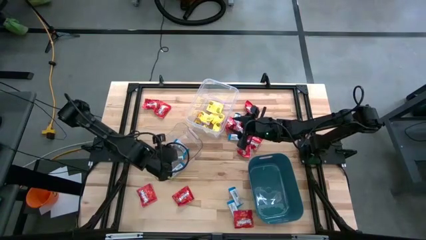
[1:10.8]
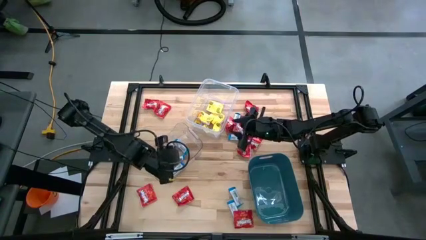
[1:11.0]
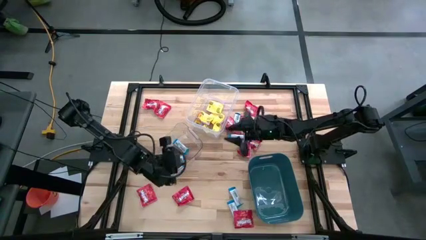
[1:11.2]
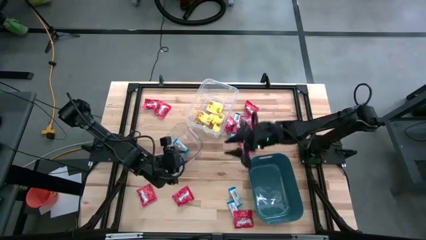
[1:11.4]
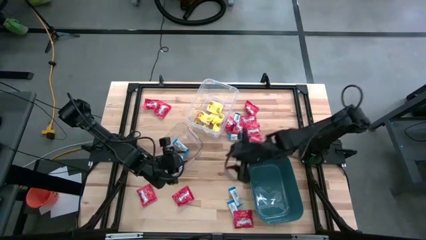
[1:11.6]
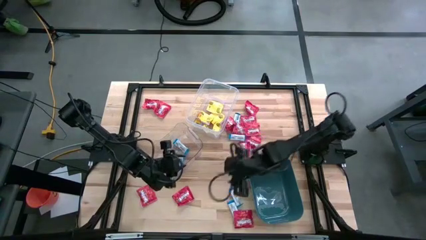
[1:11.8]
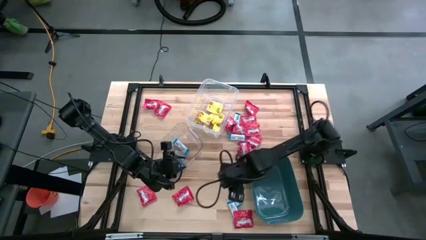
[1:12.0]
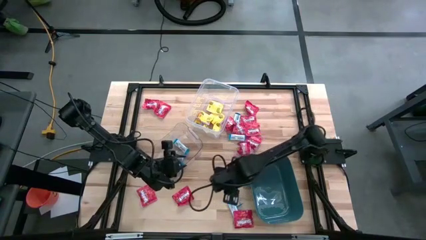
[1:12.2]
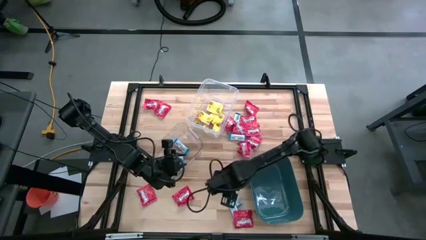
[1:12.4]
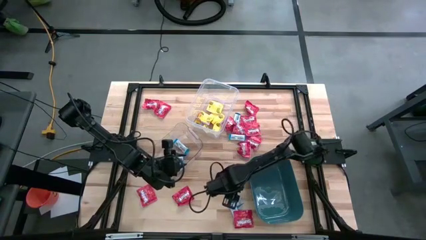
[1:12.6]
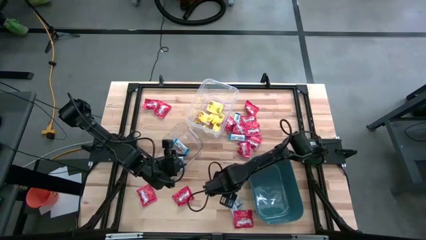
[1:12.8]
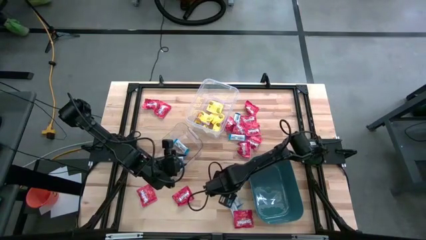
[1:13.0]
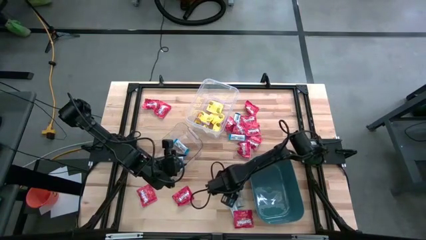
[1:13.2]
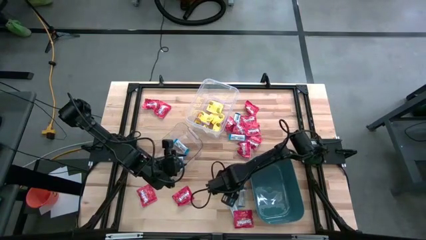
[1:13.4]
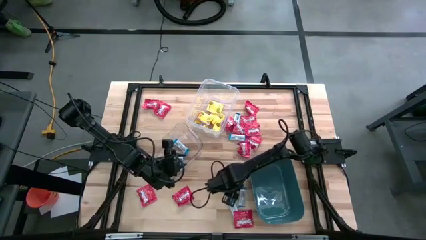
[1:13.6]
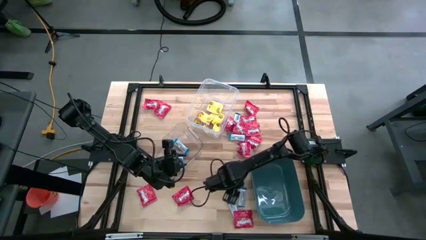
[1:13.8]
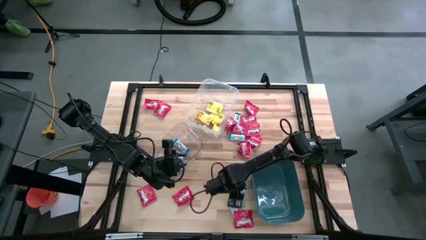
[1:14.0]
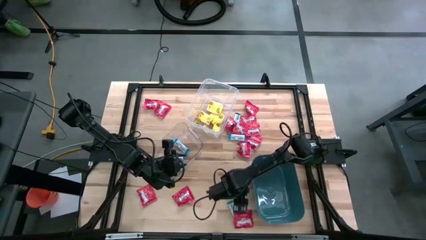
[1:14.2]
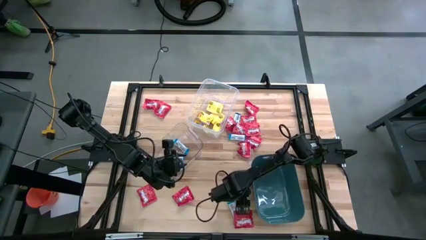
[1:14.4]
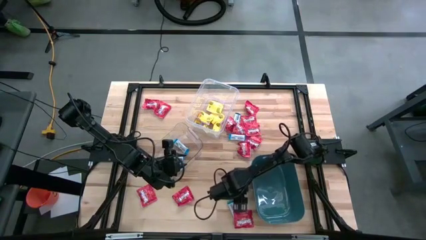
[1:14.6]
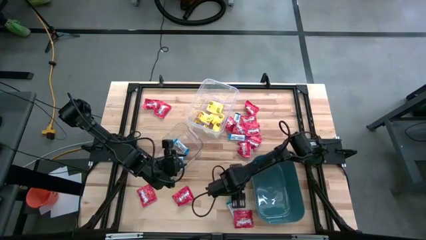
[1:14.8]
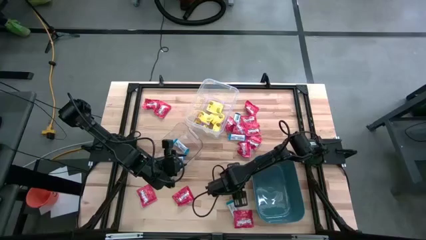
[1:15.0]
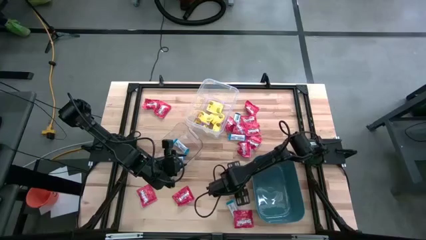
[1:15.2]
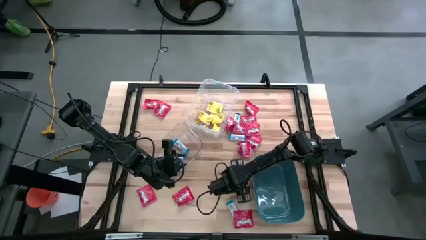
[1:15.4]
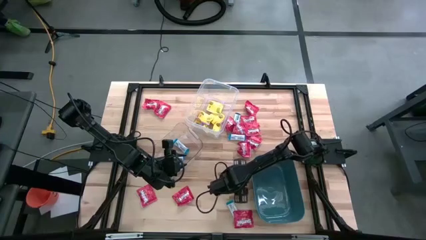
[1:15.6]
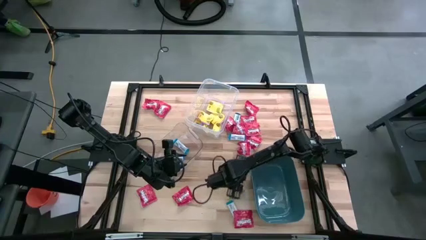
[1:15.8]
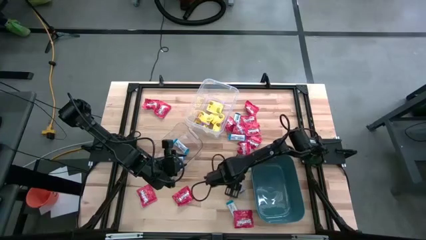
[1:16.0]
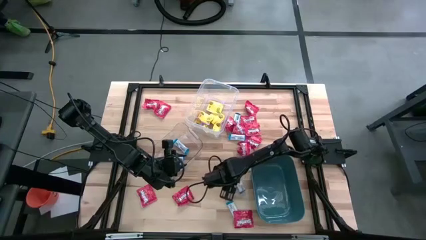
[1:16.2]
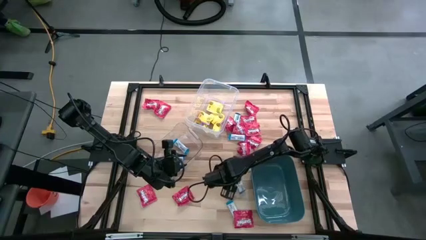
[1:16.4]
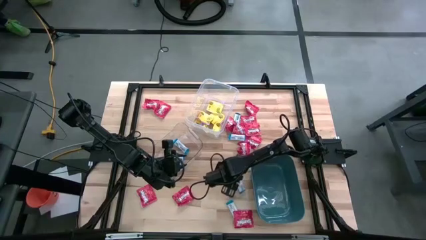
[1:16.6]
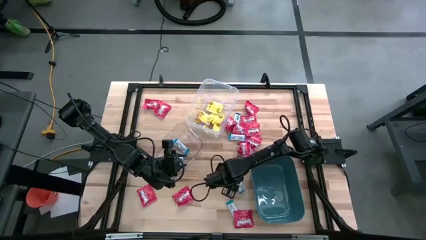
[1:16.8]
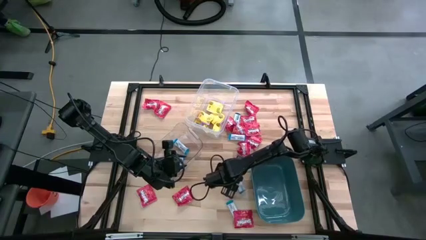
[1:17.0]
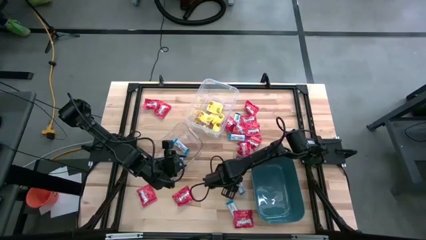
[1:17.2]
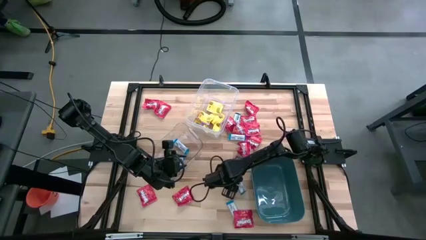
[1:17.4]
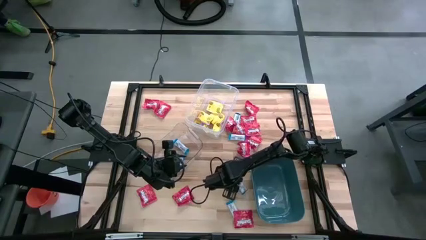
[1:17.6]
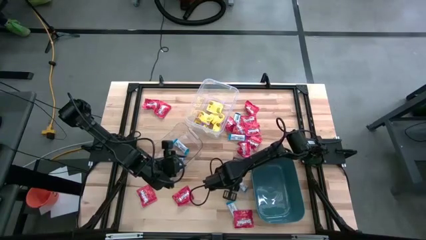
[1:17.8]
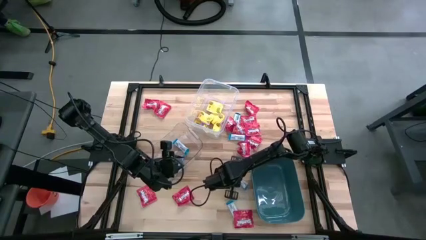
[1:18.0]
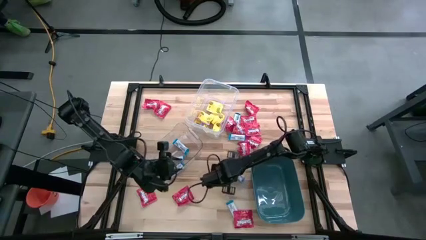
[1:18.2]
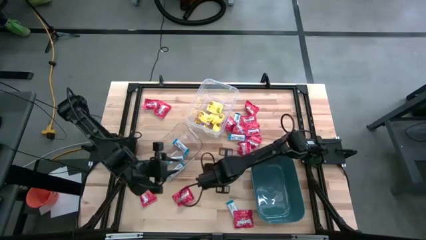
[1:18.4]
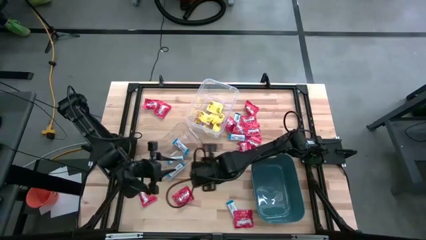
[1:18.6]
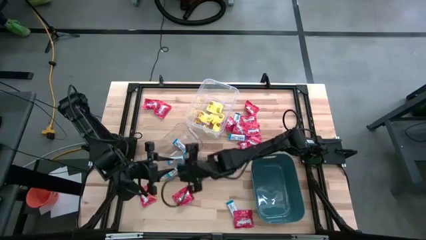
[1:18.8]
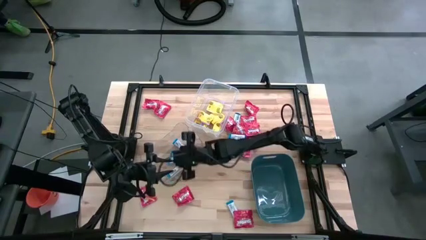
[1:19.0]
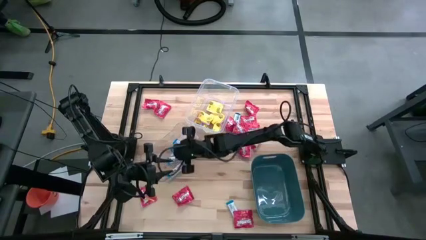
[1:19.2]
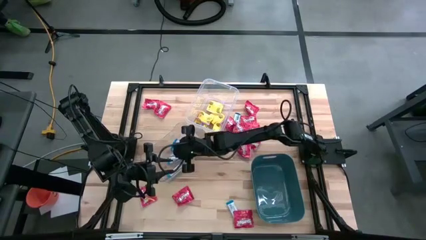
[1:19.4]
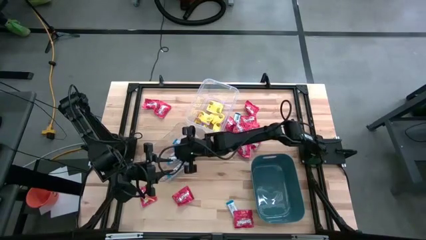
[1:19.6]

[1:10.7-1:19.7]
Task: Sort candy
Put the white chocolate into the transparent bin

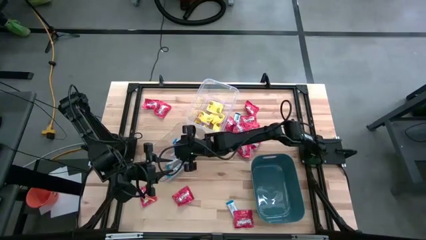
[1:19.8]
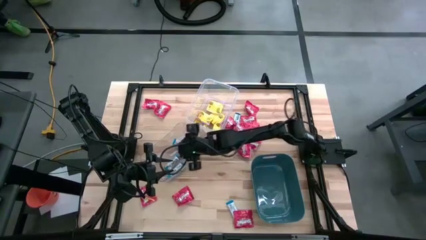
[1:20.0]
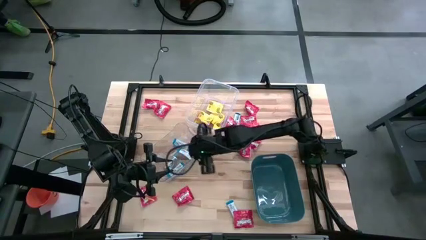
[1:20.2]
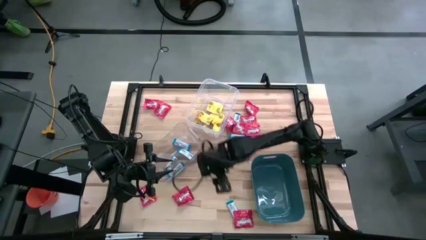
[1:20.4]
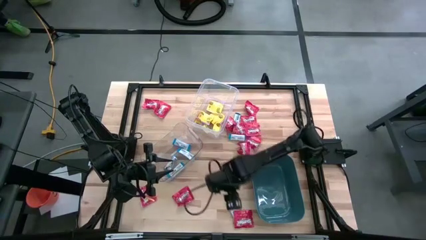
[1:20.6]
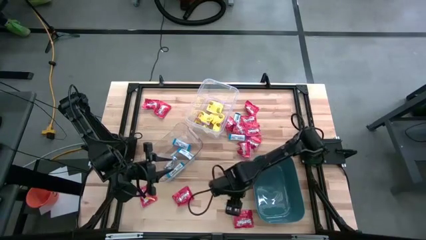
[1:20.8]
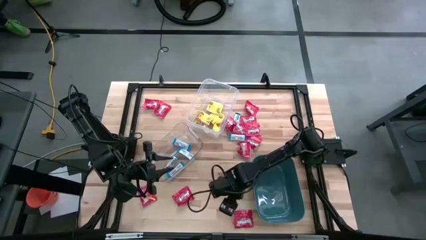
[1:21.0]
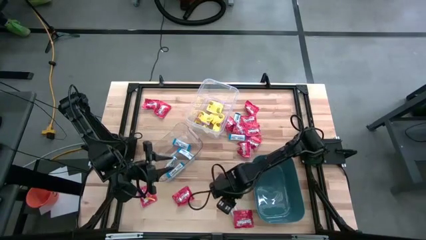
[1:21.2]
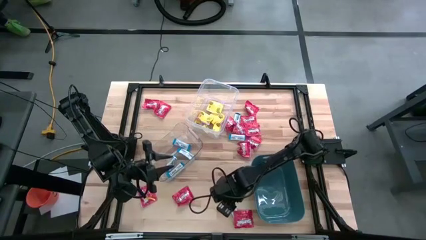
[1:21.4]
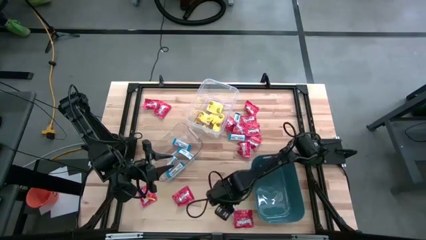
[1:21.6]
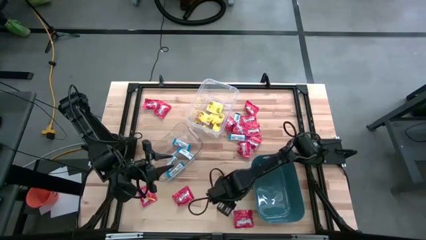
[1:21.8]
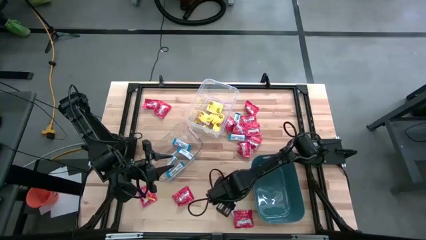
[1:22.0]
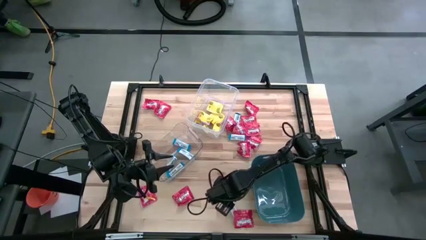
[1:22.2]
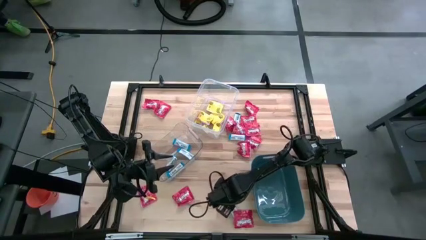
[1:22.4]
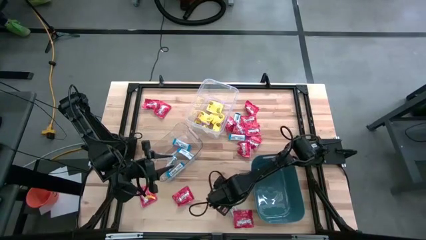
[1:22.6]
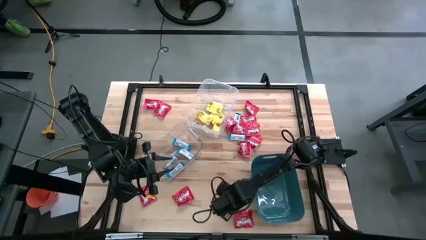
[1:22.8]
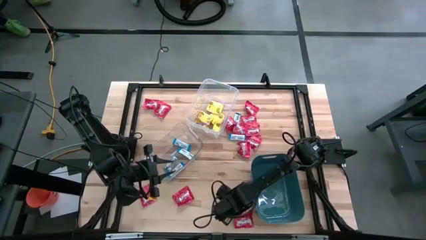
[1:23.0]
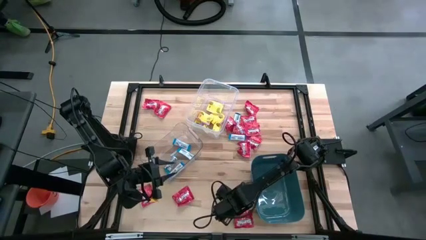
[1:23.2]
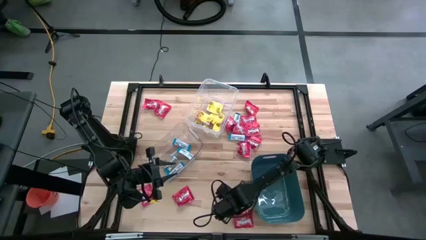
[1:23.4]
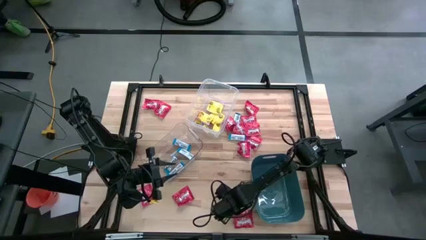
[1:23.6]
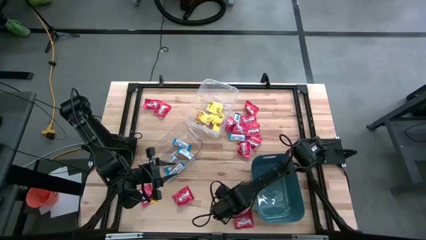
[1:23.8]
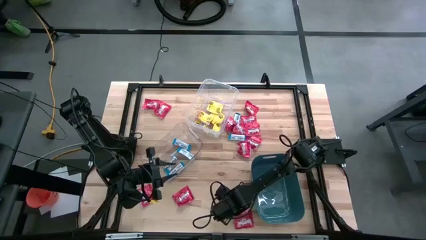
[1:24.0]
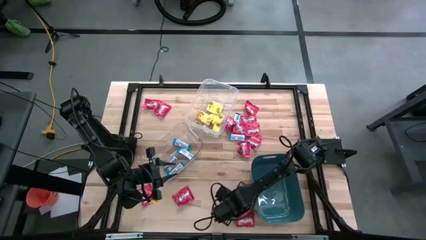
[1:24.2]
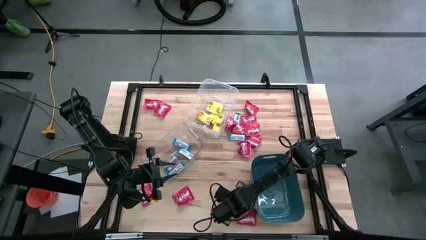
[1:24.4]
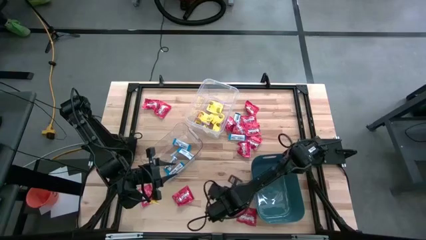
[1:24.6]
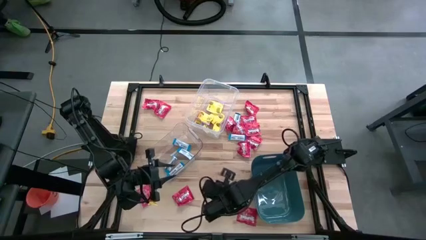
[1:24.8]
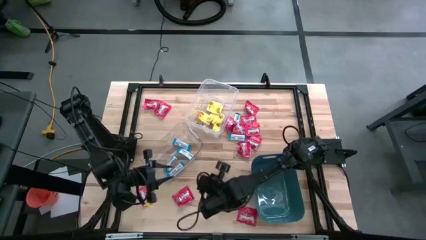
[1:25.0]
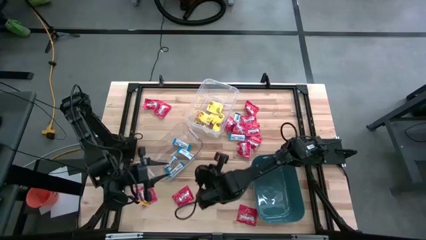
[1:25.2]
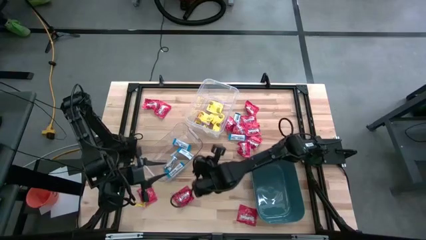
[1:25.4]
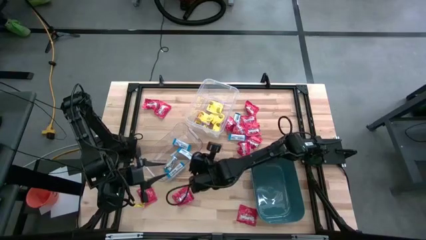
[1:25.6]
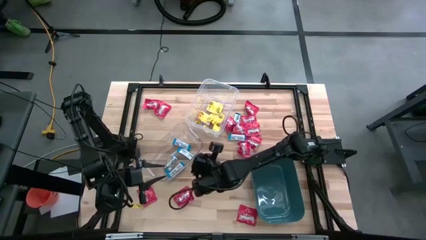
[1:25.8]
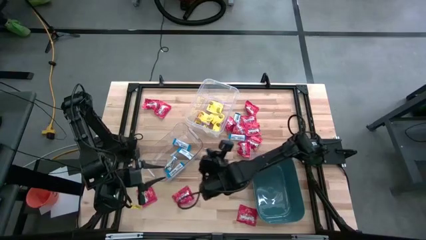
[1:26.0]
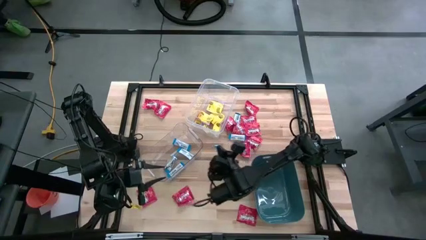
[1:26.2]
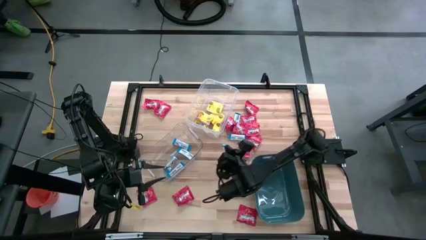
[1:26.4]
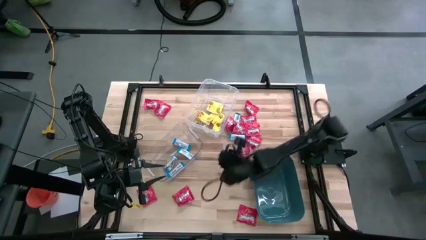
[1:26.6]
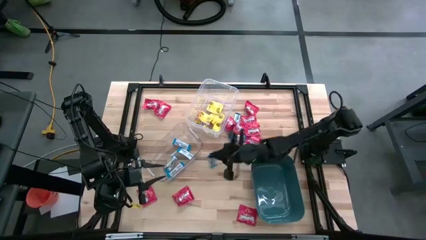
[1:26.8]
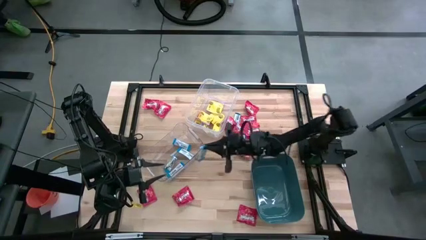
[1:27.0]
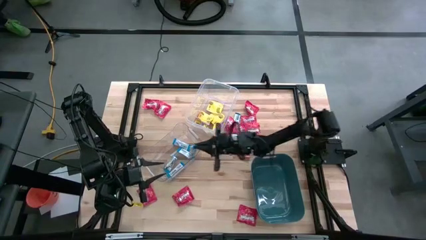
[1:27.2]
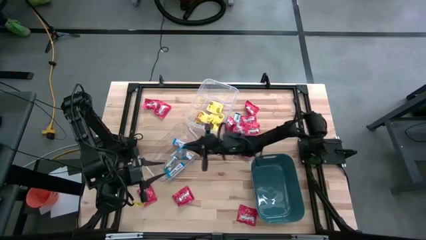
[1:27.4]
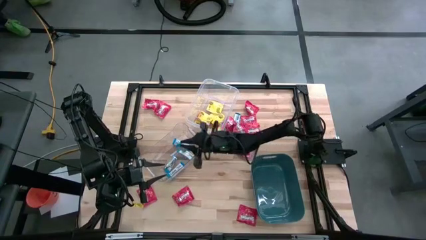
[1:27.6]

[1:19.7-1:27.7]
Put the white chocolate into the transparent bin
